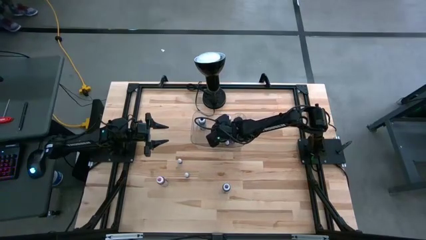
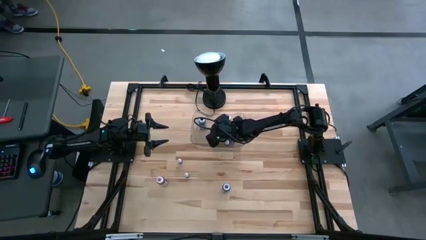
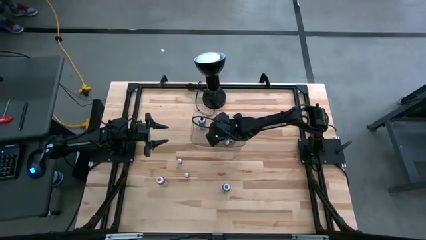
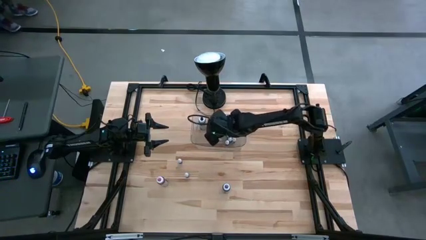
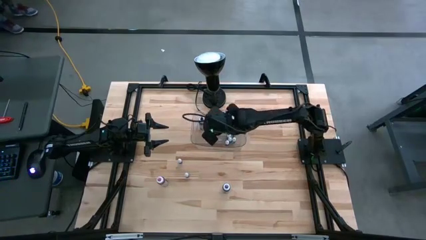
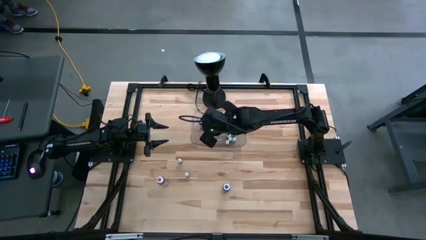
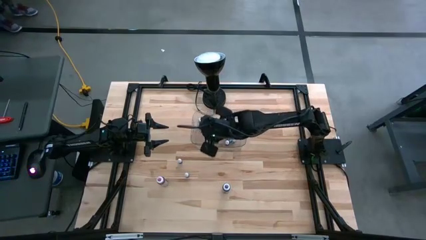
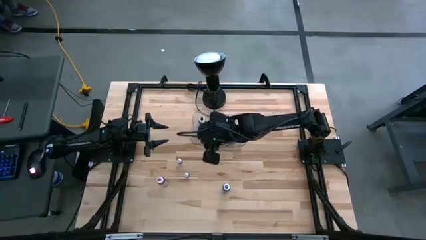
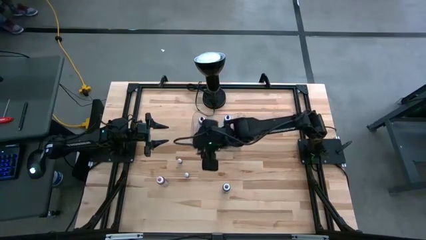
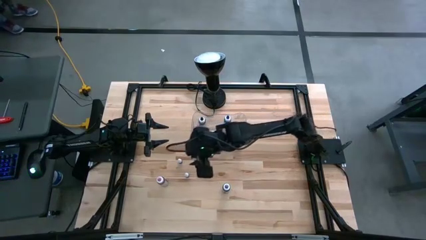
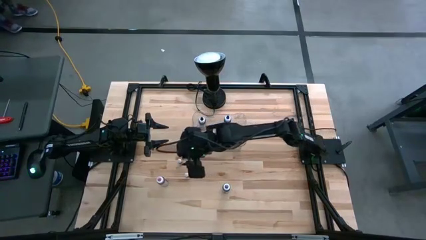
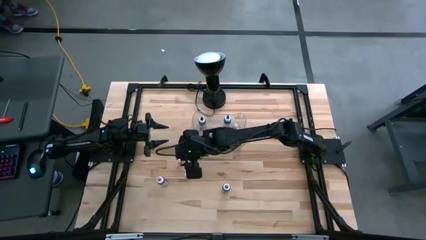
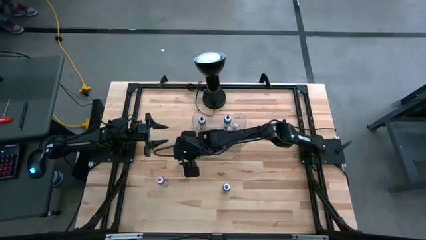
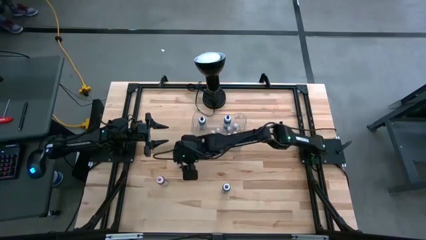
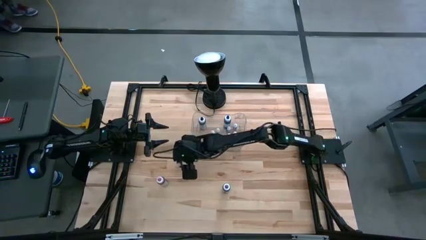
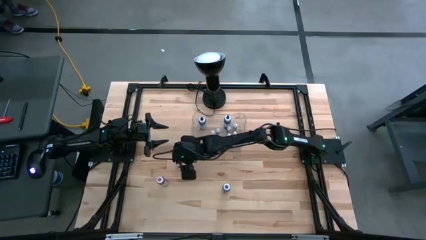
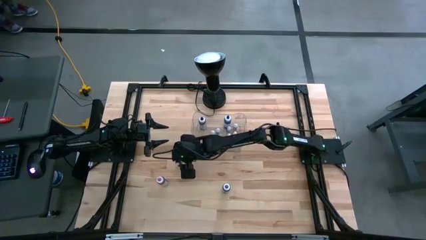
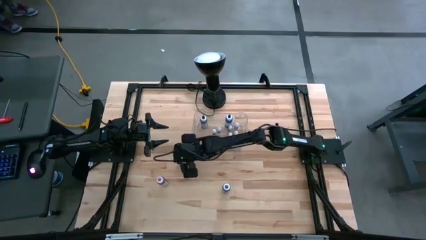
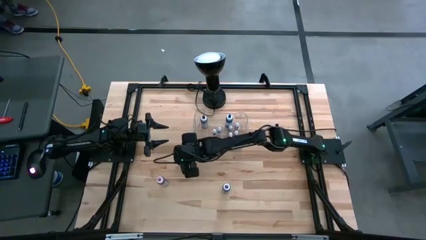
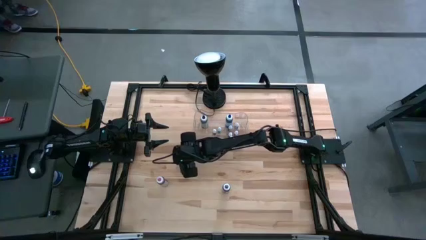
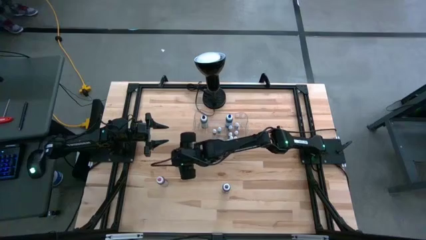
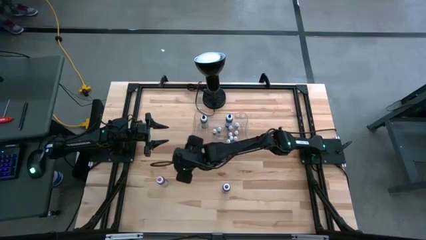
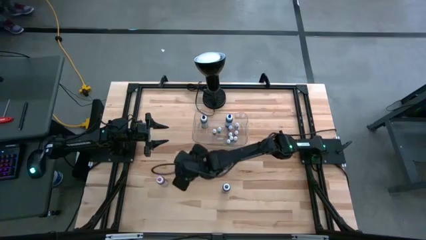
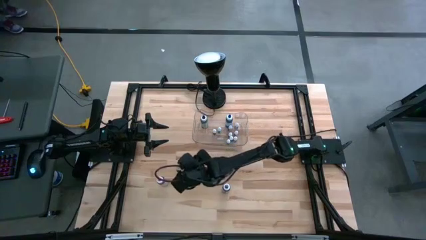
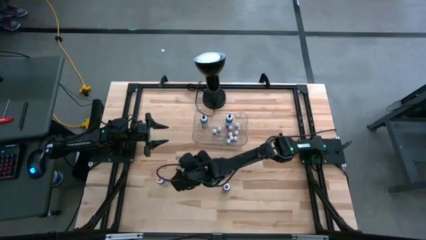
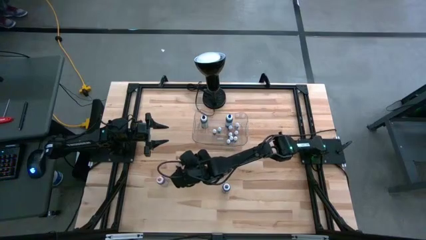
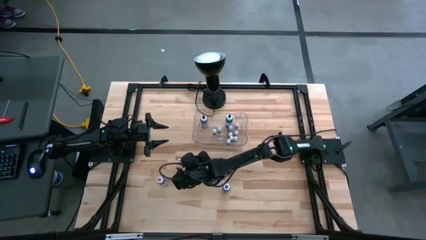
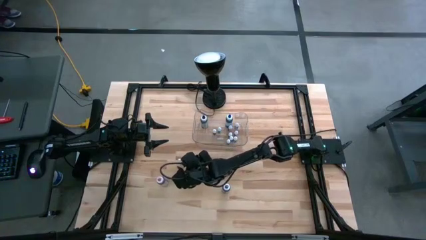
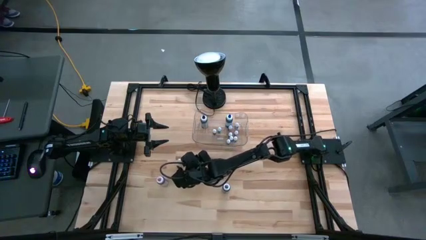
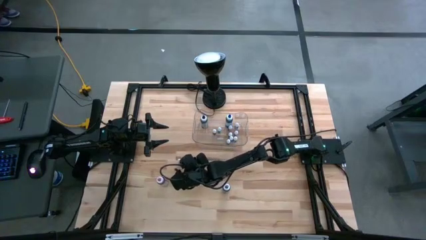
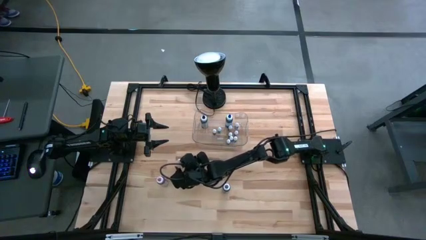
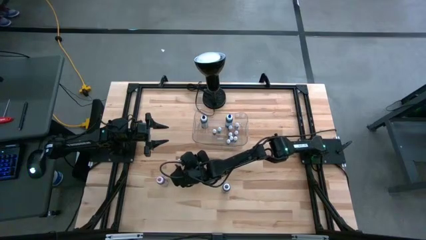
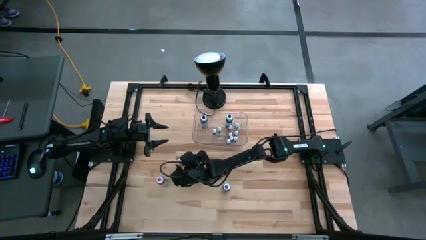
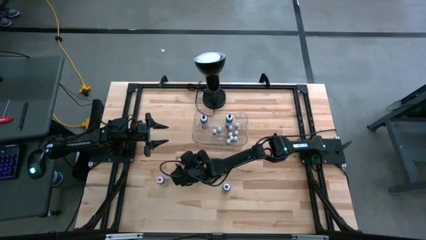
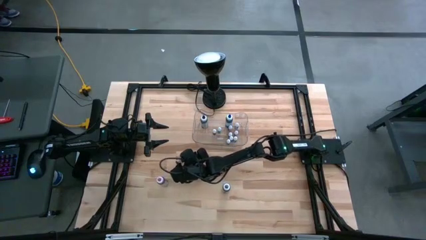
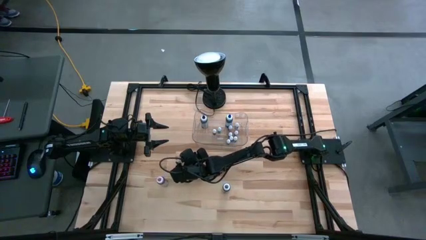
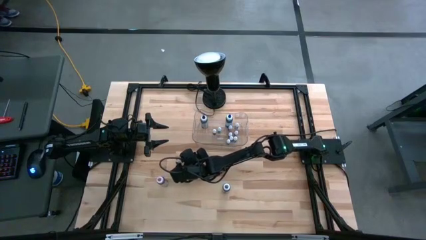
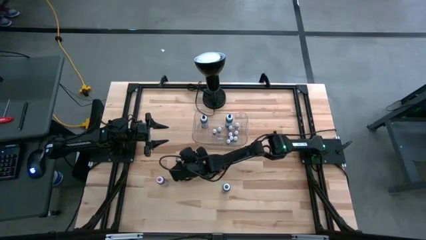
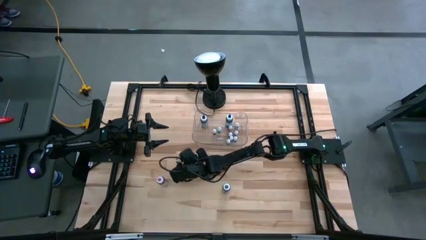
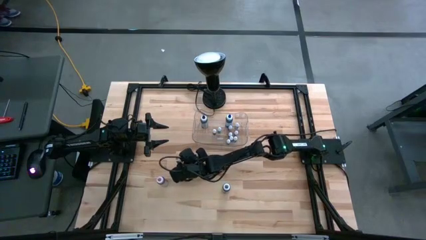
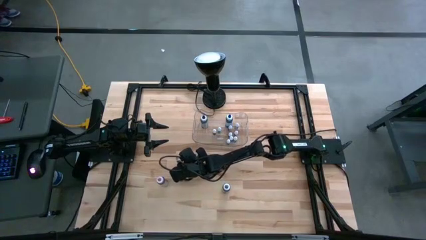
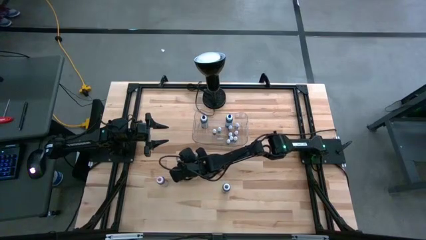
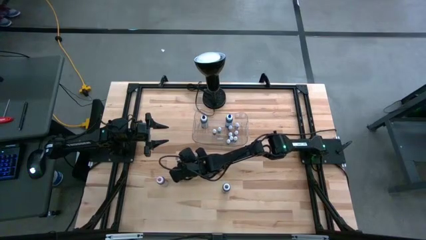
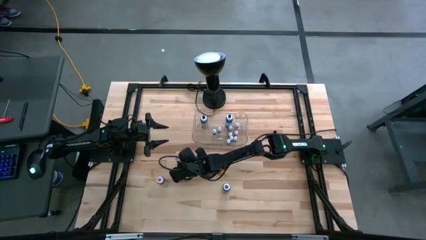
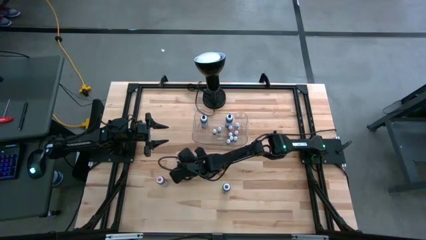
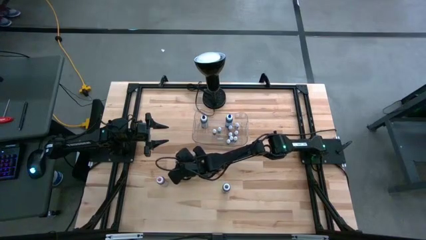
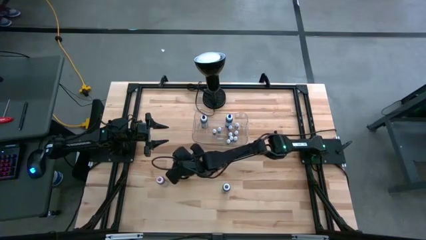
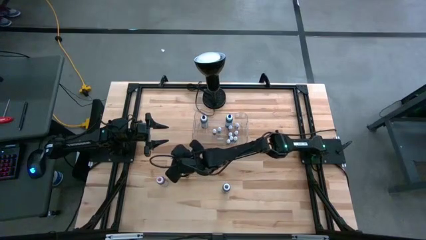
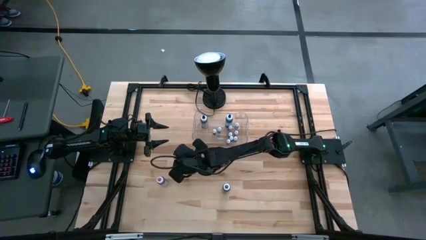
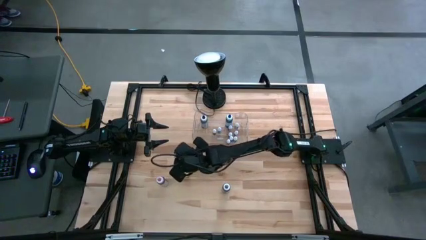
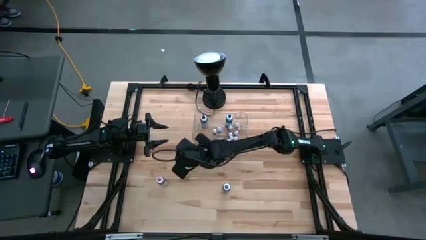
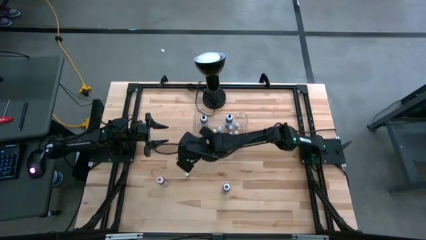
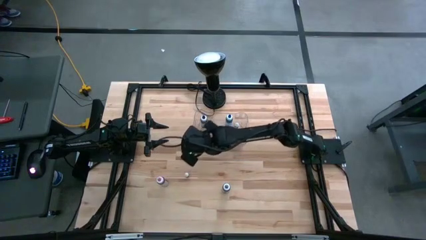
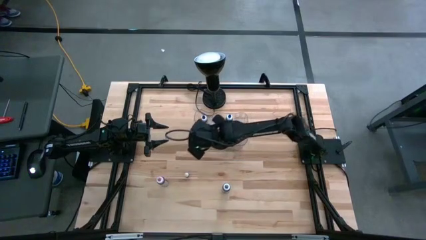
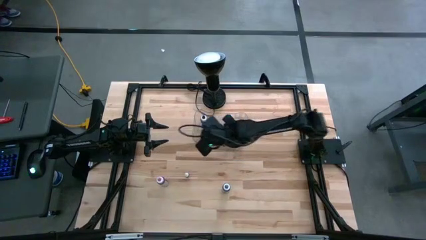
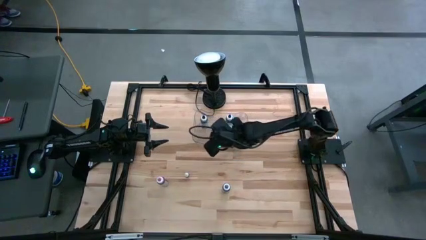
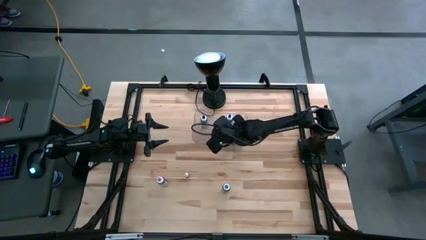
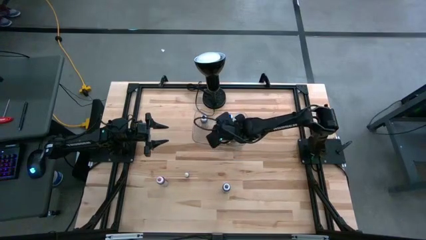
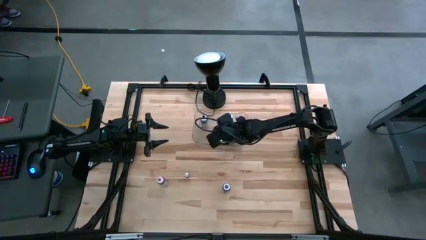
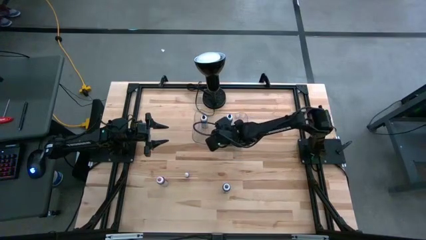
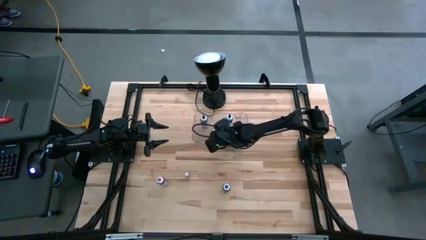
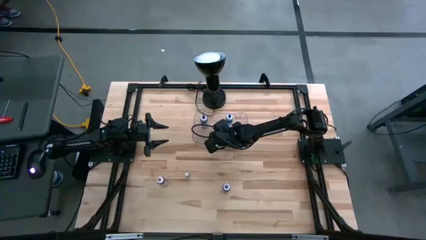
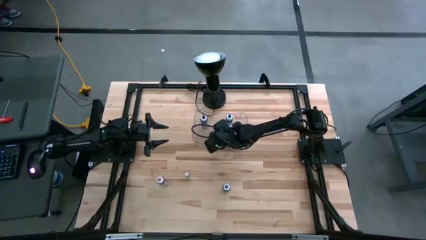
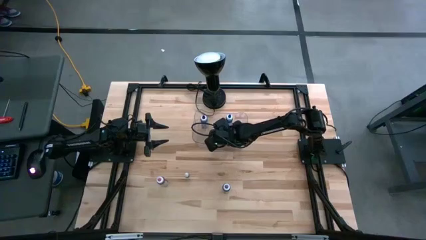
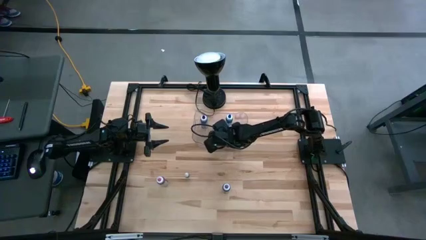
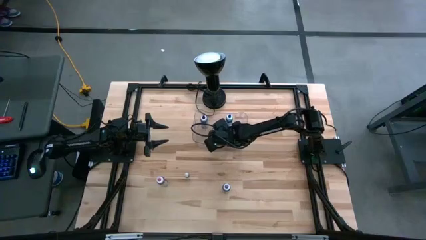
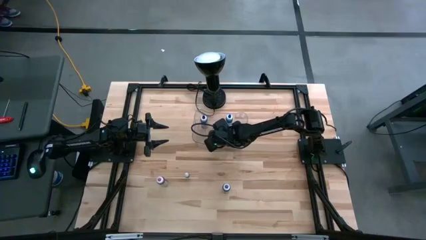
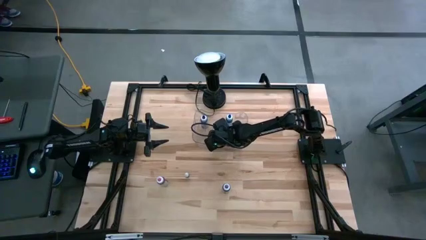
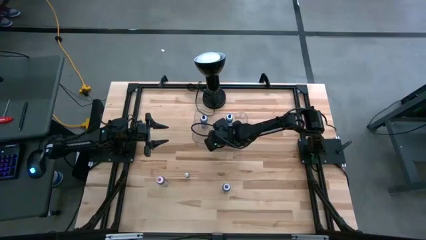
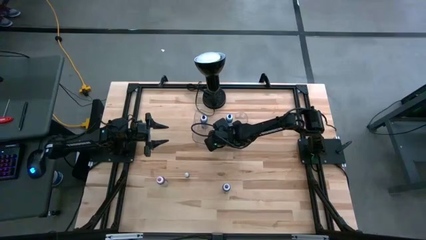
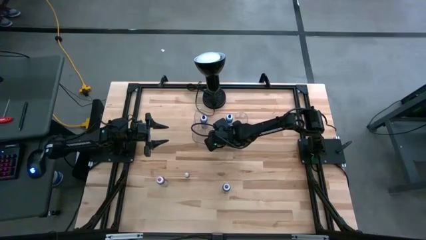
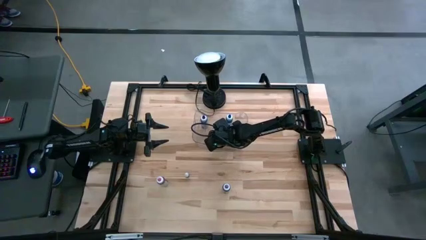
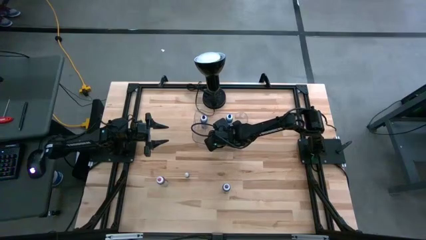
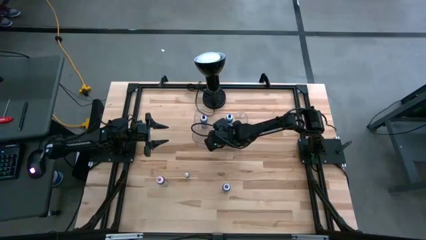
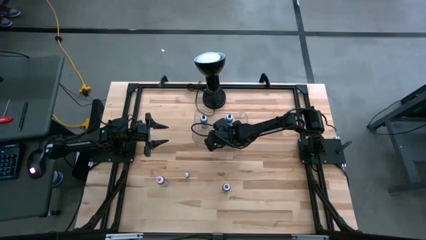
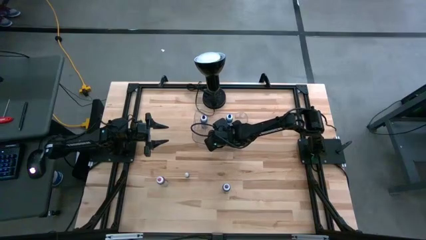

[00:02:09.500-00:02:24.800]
Task: Pick & Place food coloring
Put the small purple food coloring bottle into the transparent bin
